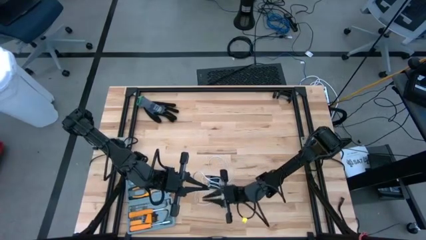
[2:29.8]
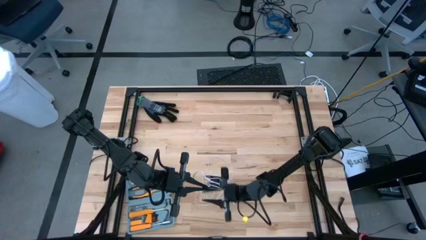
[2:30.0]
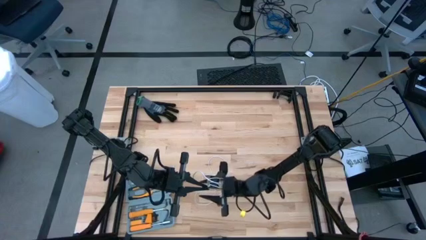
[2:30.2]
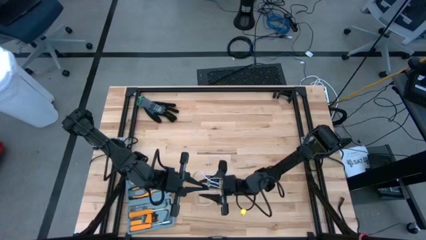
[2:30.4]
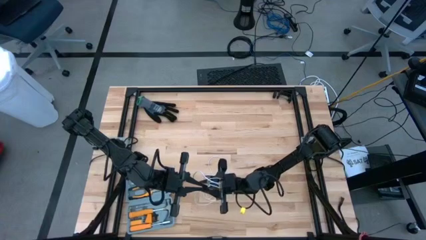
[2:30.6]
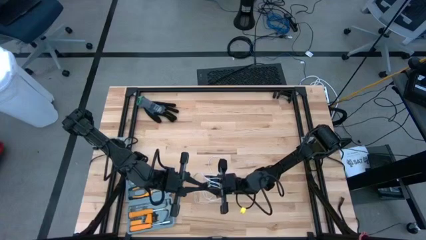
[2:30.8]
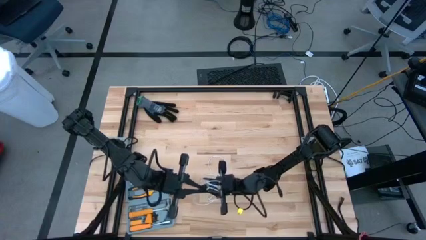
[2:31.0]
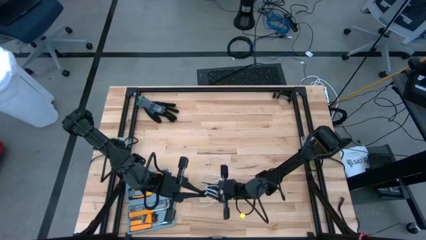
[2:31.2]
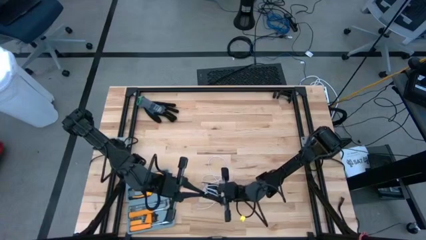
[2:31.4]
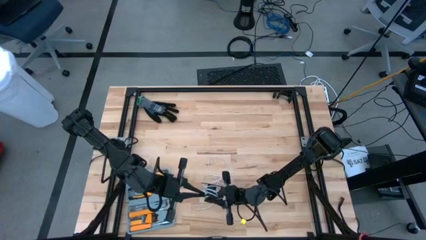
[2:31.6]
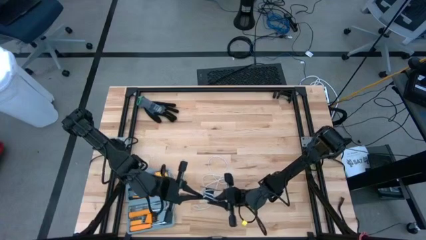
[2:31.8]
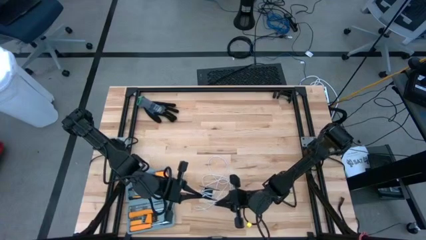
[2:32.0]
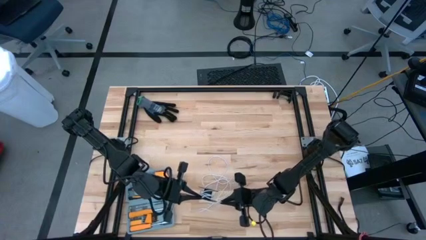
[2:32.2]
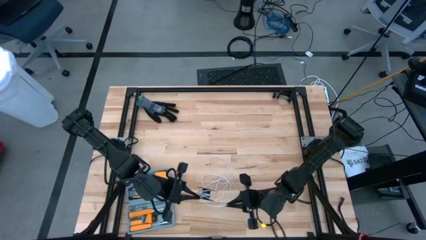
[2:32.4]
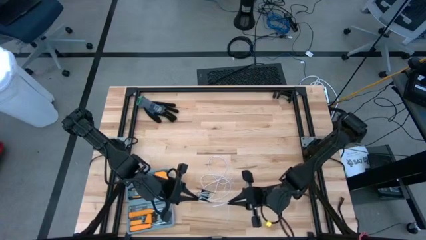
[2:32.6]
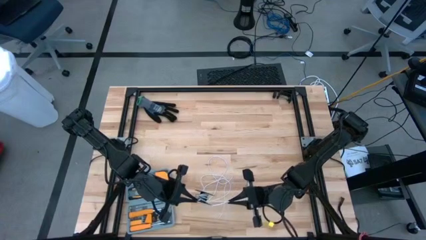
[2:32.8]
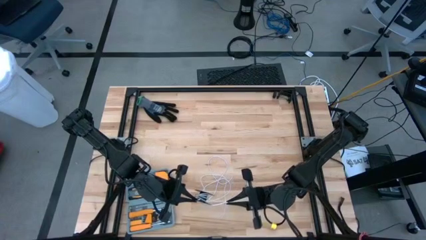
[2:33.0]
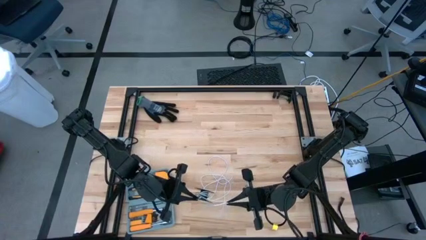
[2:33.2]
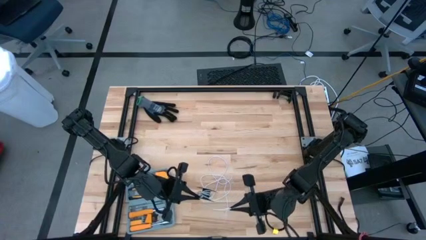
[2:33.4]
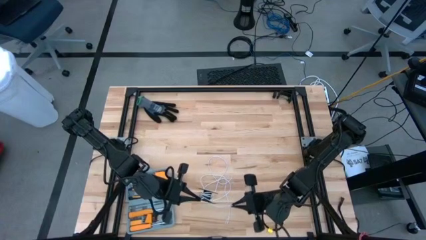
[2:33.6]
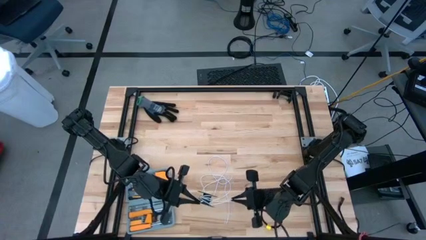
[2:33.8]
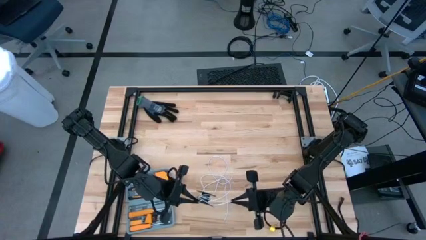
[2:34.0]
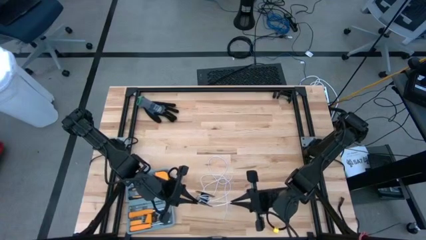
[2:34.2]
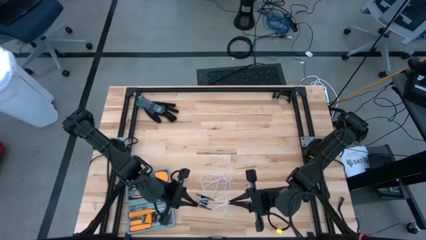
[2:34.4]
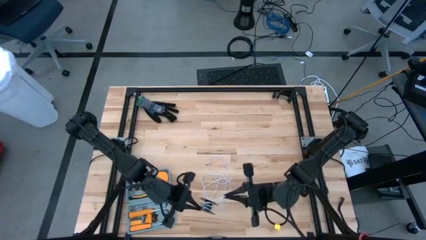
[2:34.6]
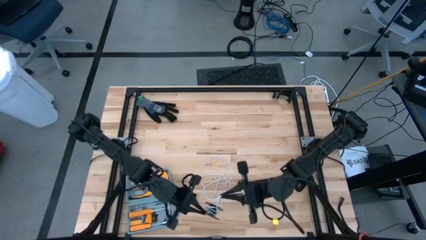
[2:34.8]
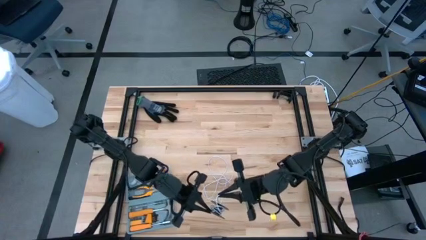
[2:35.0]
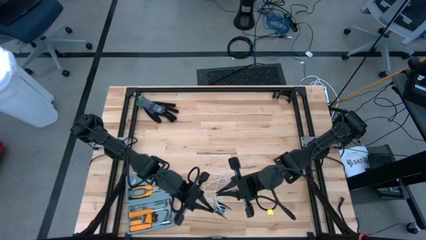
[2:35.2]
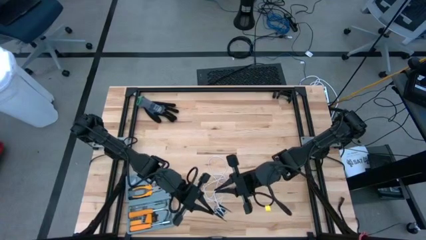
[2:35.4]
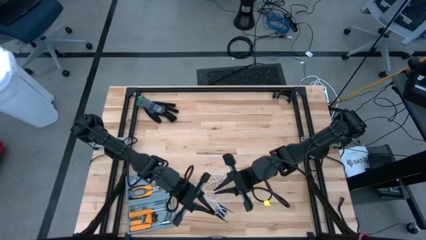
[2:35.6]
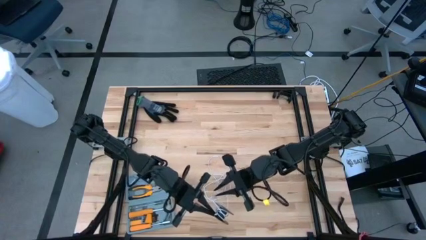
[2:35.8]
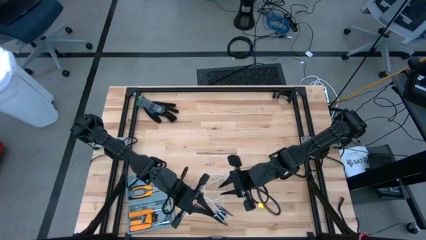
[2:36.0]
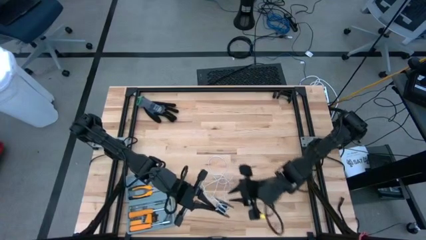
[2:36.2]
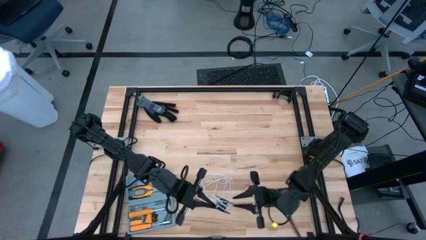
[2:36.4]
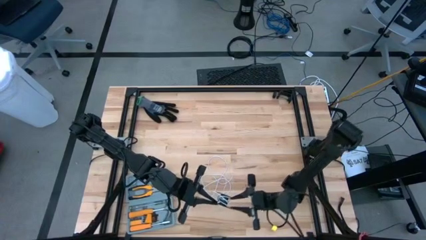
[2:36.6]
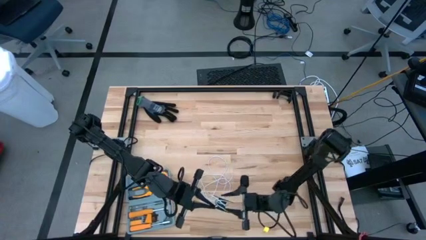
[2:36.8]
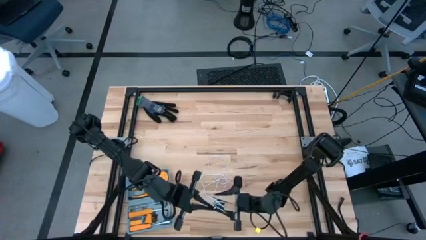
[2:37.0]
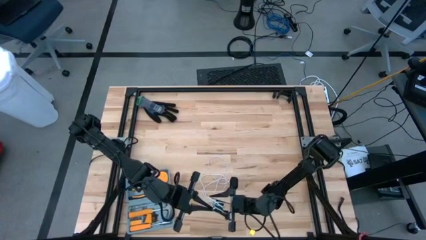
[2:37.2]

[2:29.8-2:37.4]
Task: Coil cords
Coil the white cable wire into the spool

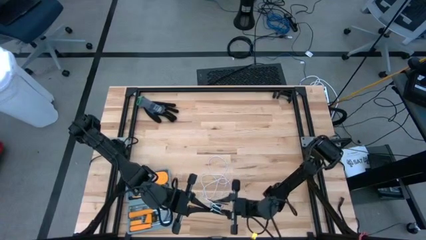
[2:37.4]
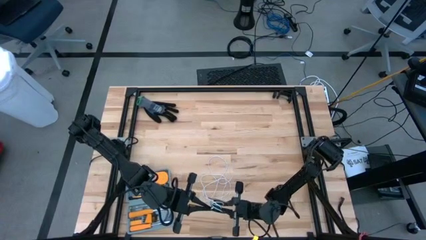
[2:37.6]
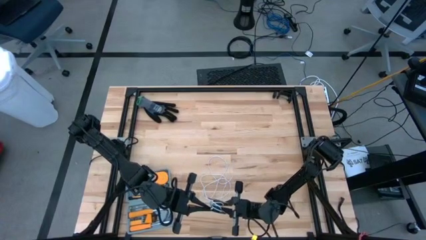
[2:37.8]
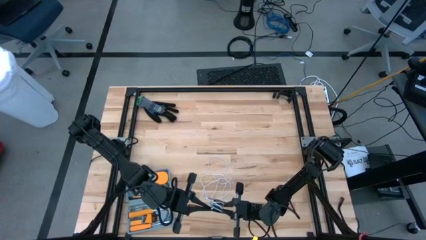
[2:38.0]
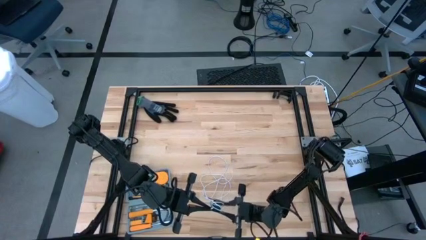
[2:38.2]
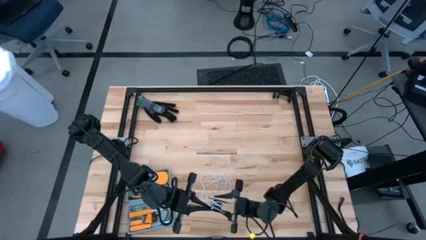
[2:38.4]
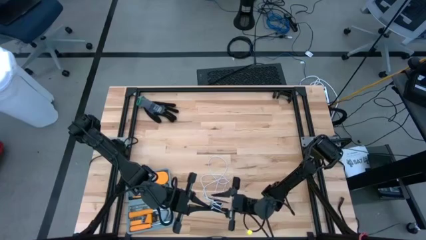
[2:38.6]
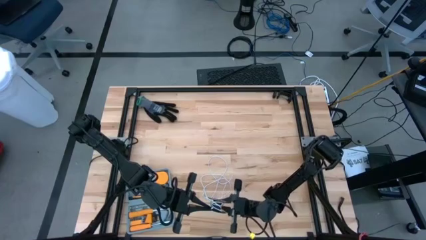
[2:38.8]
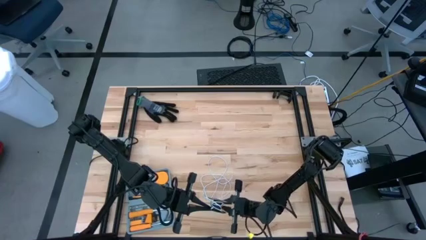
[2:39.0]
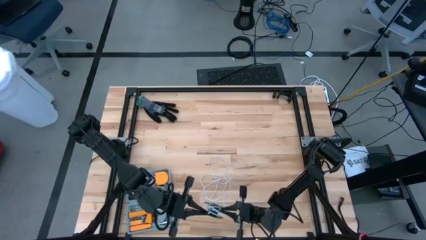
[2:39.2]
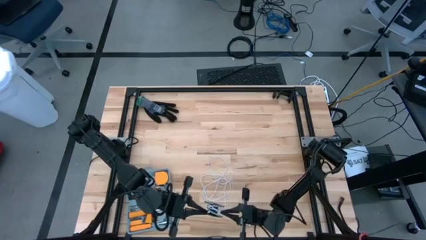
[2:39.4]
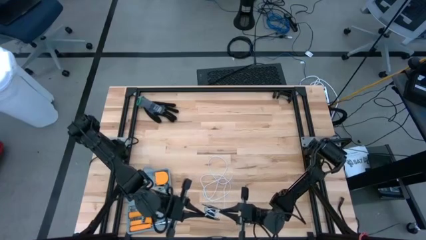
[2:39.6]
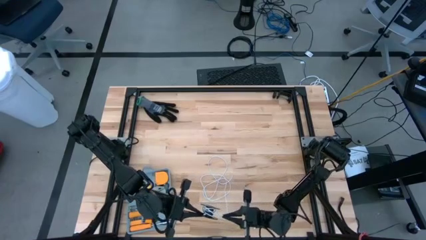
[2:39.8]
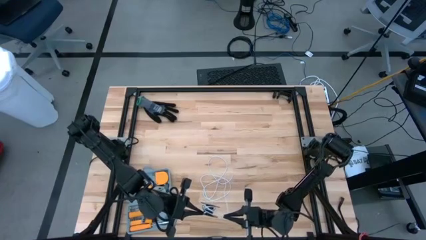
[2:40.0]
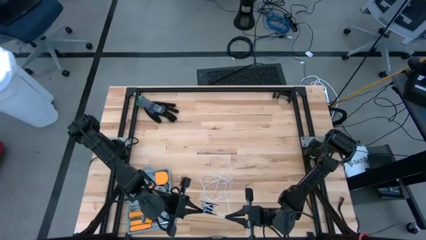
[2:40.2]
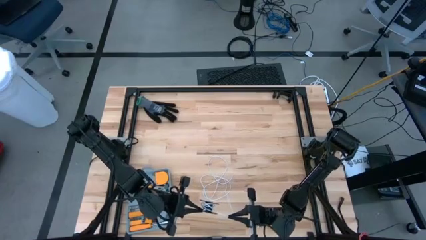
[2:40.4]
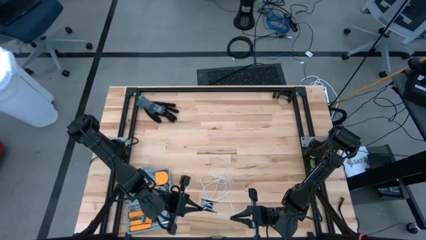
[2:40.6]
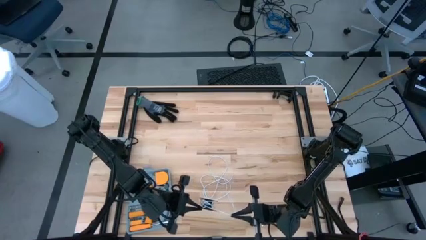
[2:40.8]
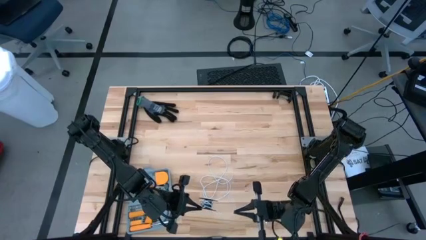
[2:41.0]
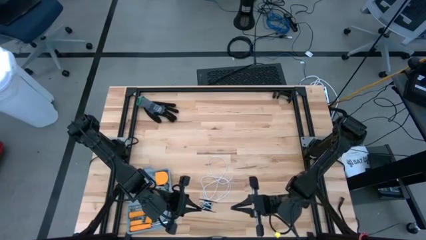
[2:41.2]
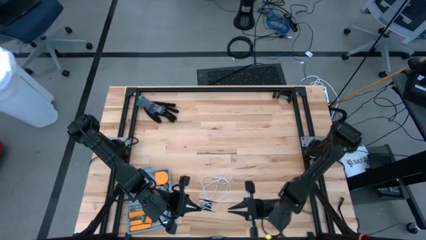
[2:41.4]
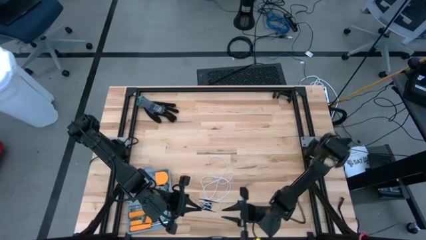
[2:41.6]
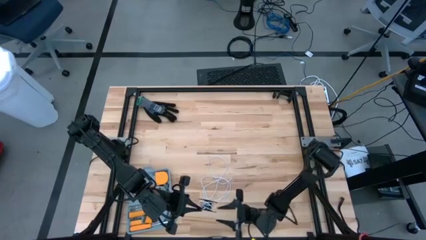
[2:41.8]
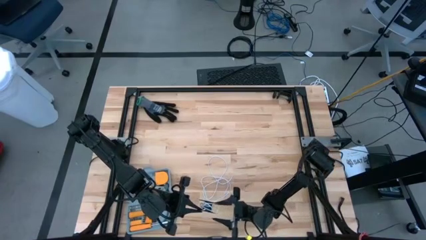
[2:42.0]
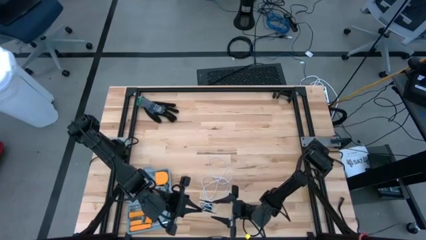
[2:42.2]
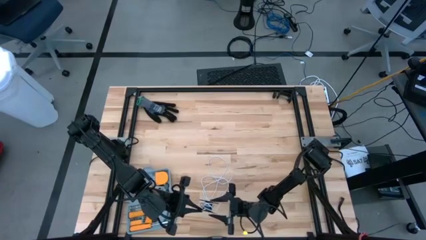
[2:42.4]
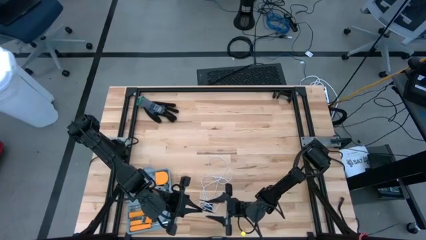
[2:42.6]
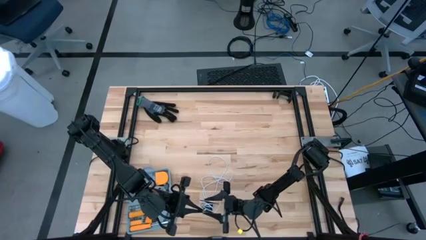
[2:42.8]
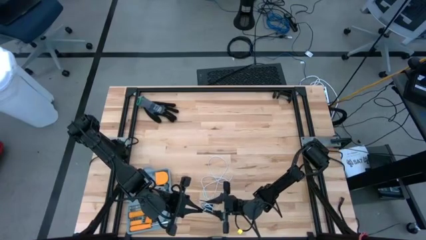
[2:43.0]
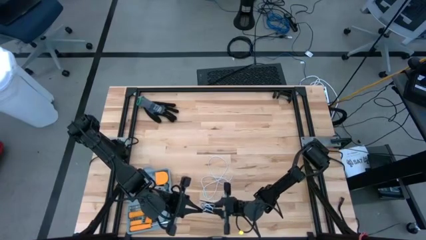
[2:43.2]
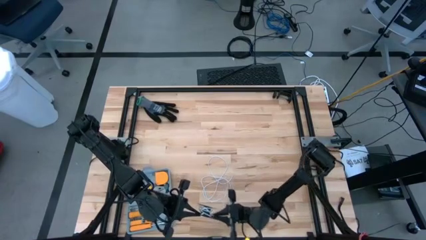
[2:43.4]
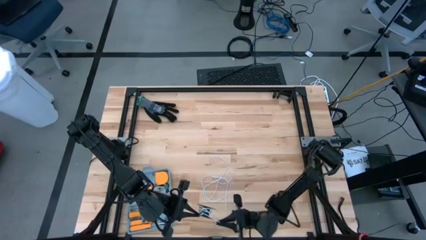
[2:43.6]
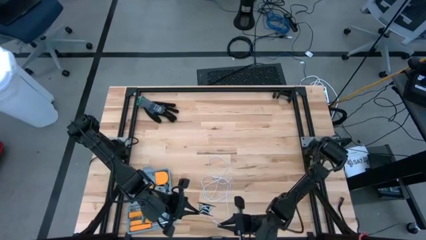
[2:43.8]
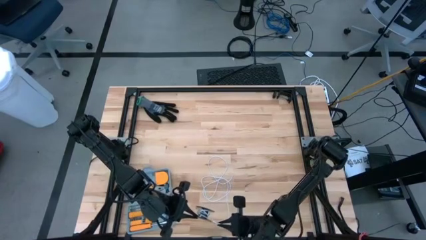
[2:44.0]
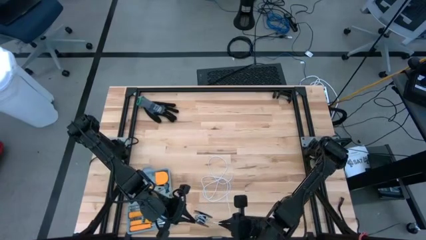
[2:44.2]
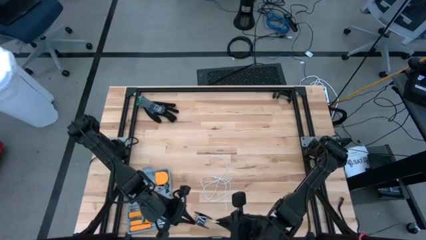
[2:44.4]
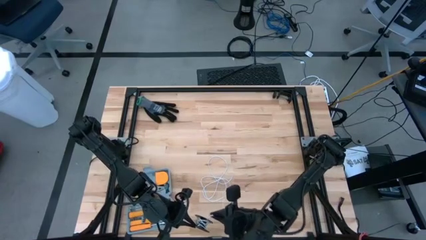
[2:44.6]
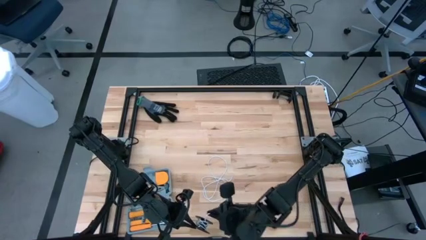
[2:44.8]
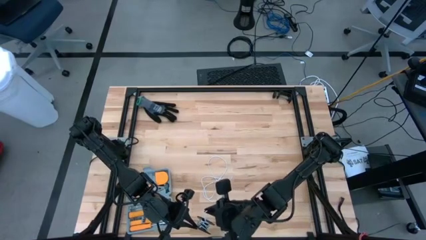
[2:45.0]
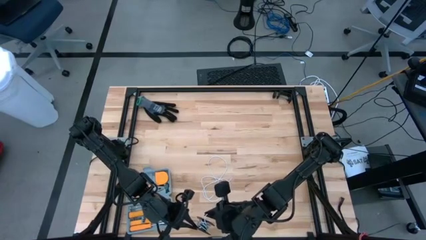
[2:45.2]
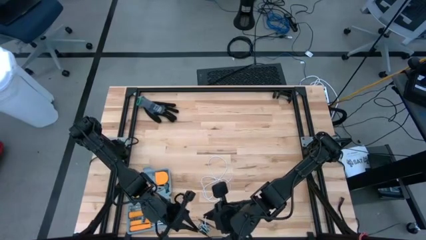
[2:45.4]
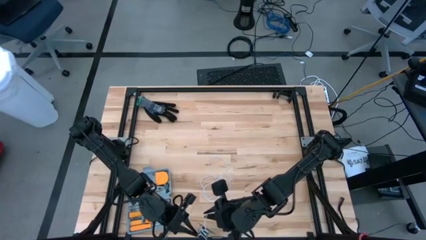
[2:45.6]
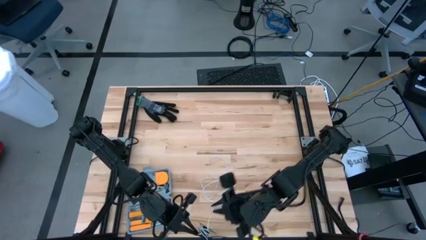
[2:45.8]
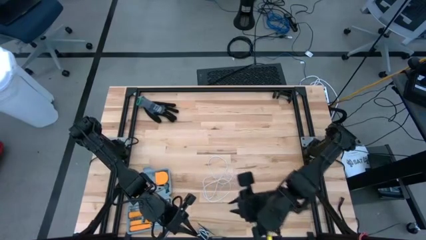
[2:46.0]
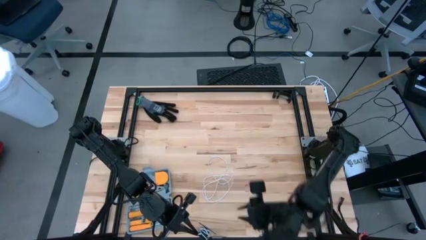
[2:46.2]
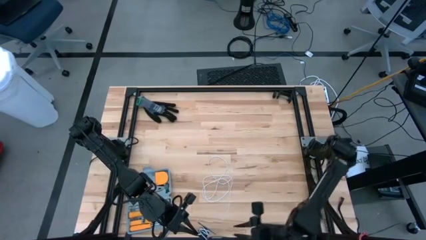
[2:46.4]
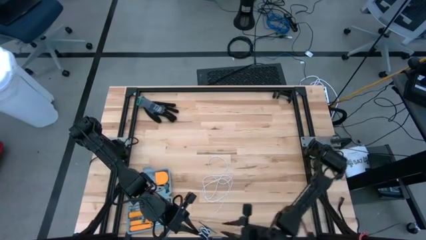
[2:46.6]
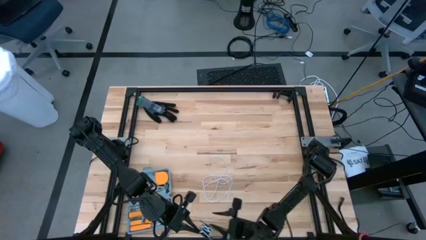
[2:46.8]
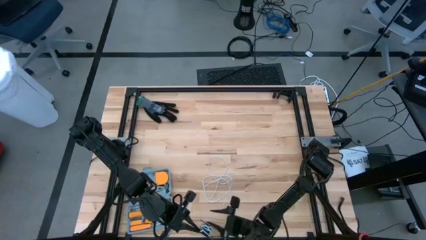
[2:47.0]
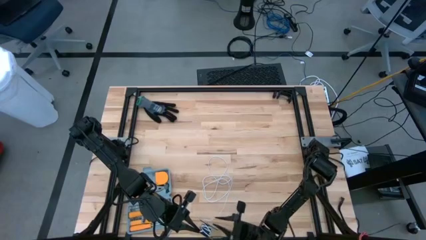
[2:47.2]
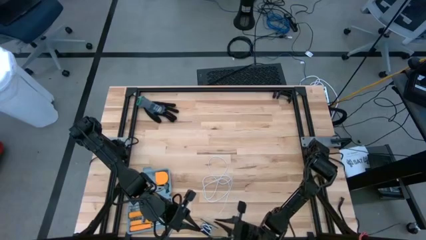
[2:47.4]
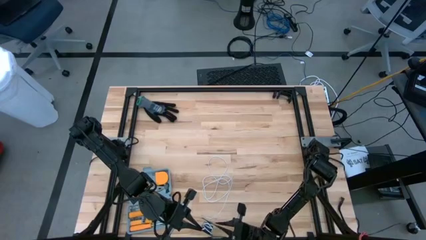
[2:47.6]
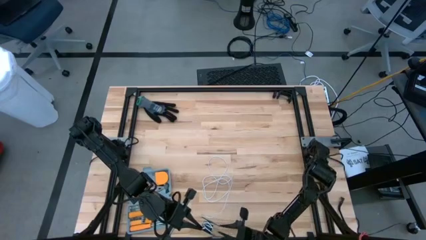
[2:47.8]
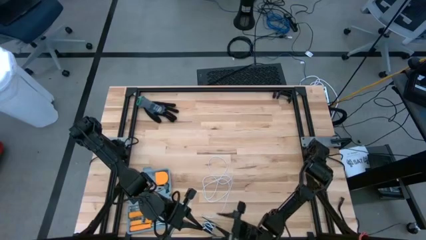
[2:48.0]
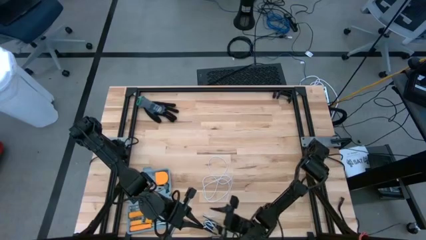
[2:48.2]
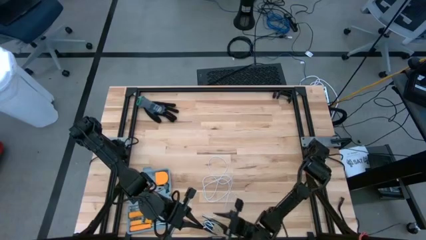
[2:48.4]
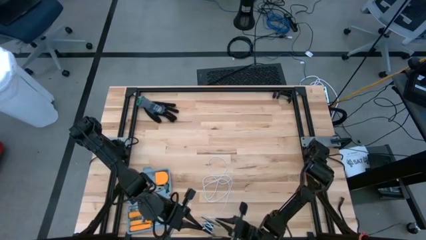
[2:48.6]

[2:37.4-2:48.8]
Coil the white cable wire into the spool
